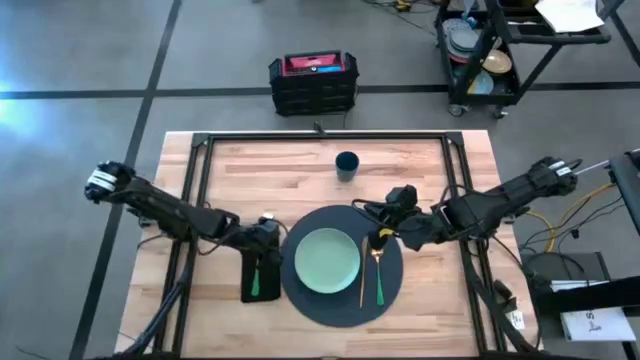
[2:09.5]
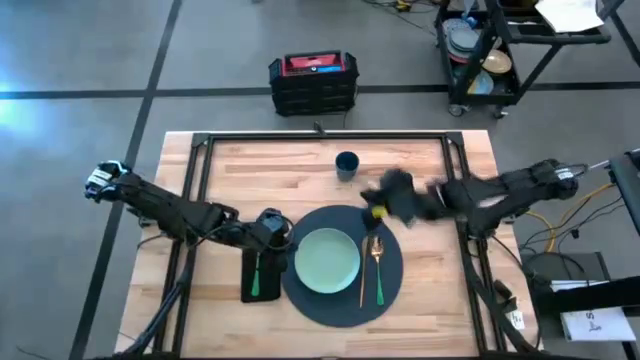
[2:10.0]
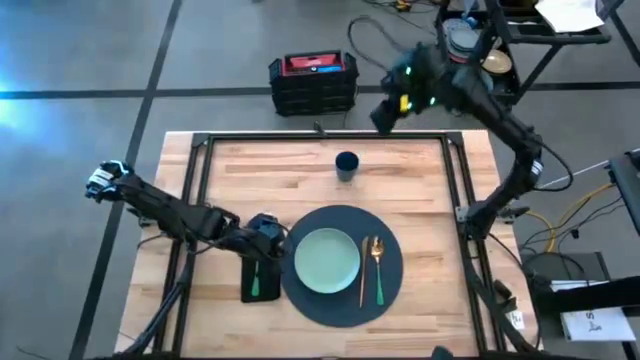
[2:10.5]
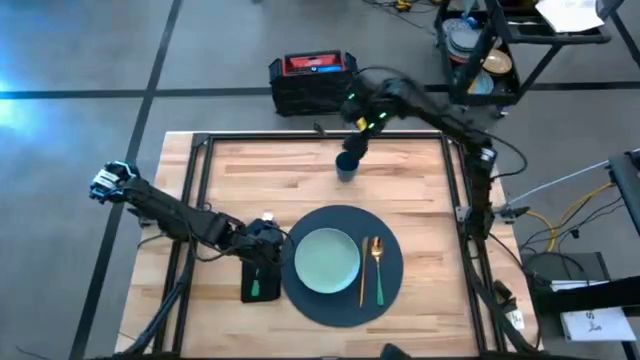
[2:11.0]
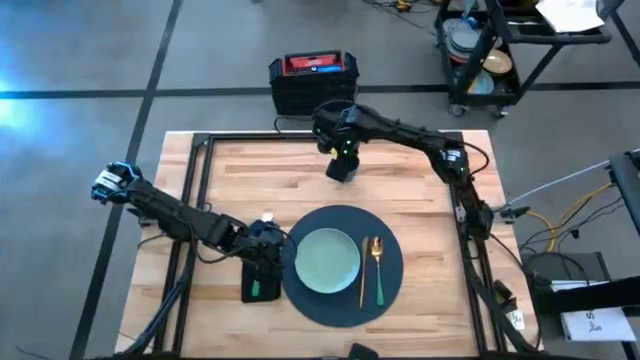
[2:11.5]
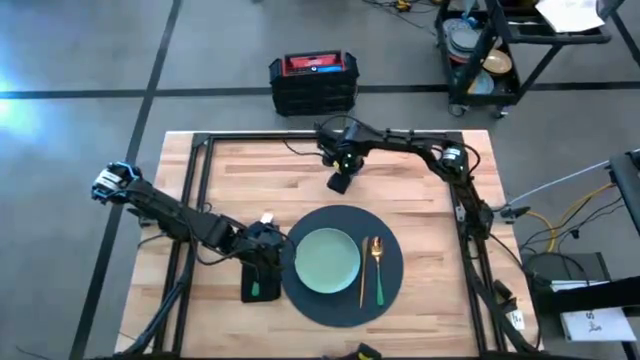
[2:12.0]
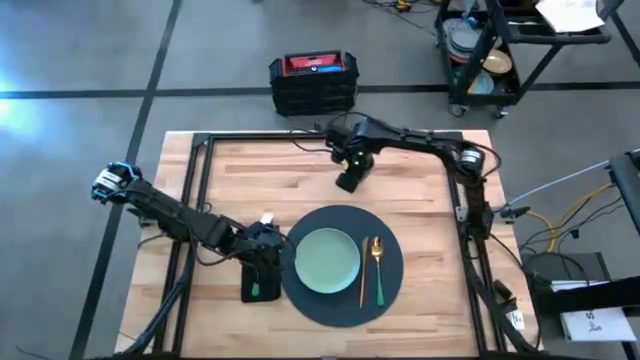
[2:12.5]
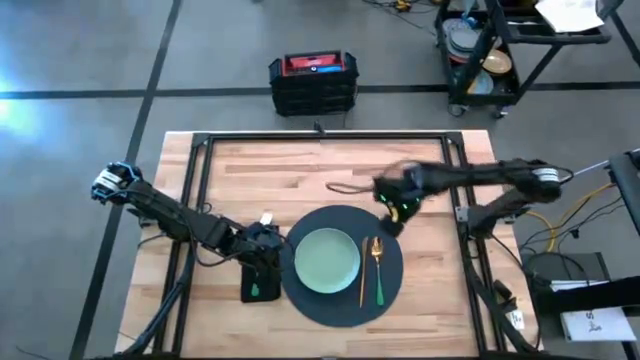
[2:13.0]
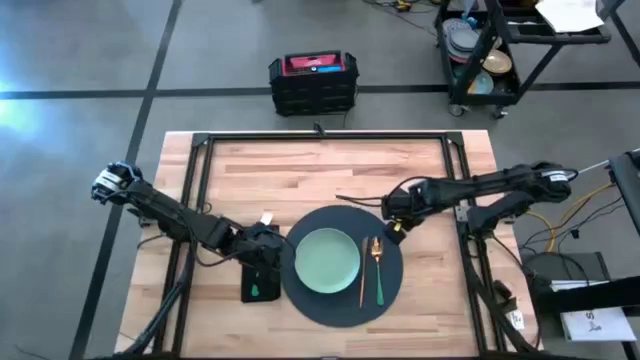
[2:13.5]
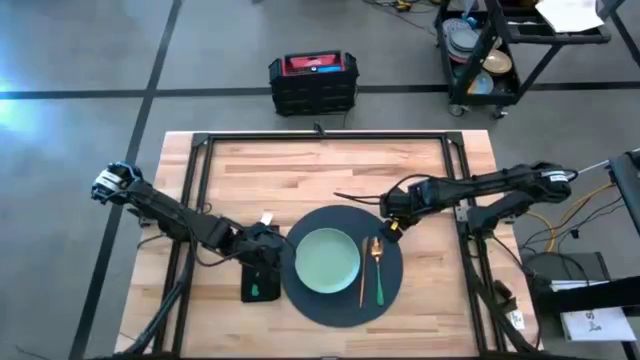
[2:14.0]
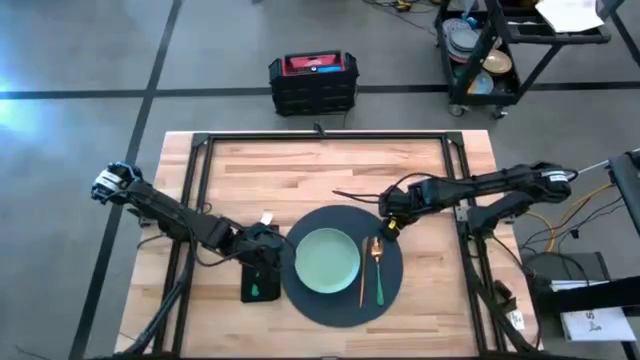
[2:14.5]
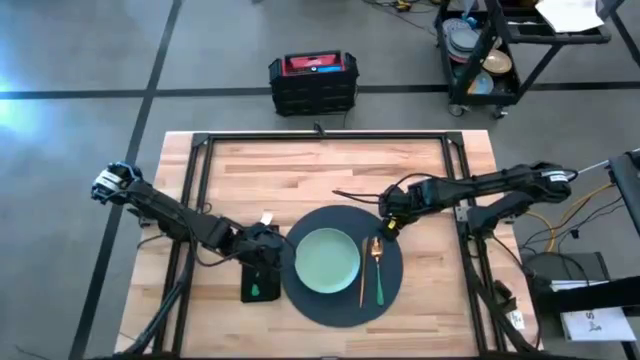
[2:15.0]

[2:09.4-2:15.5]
Task: Set table place
Move the blue cup to the middle right of the black placemat

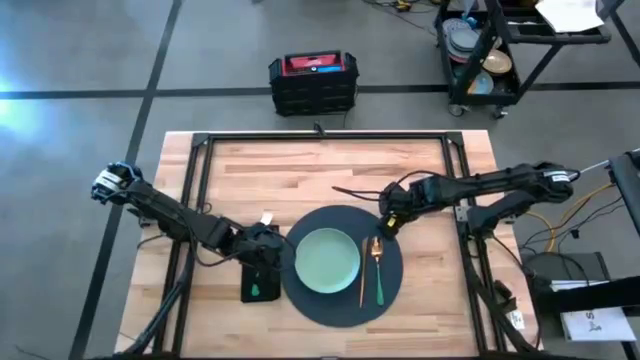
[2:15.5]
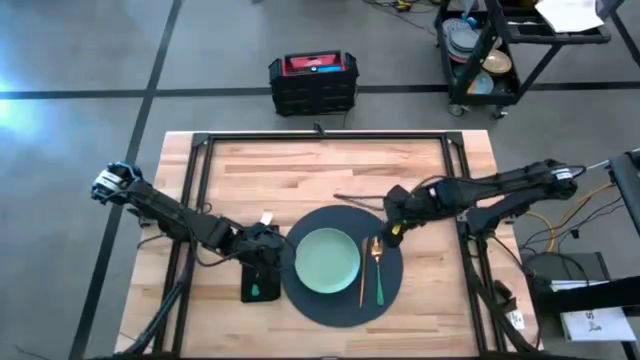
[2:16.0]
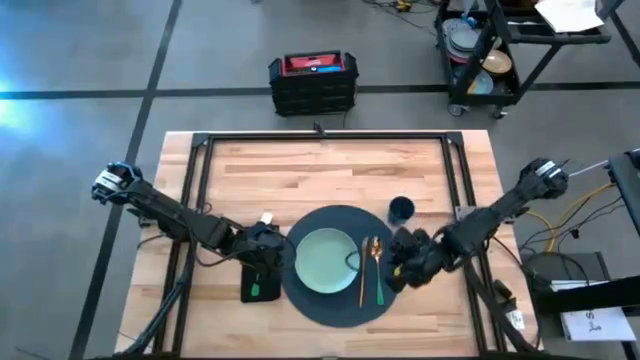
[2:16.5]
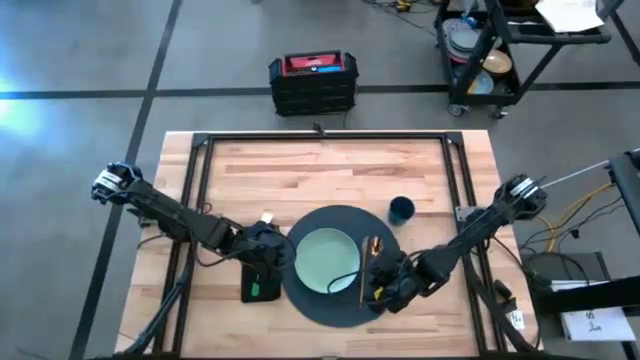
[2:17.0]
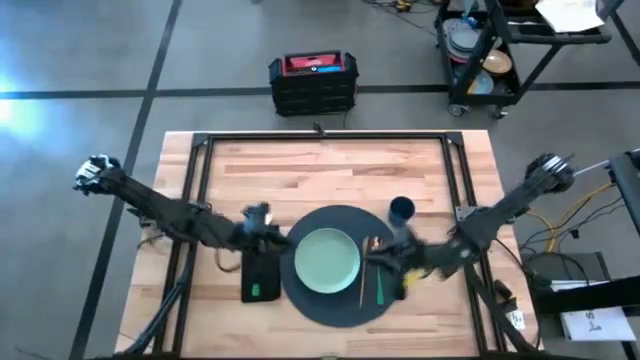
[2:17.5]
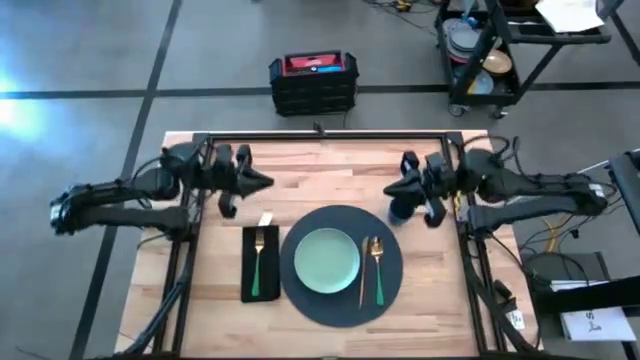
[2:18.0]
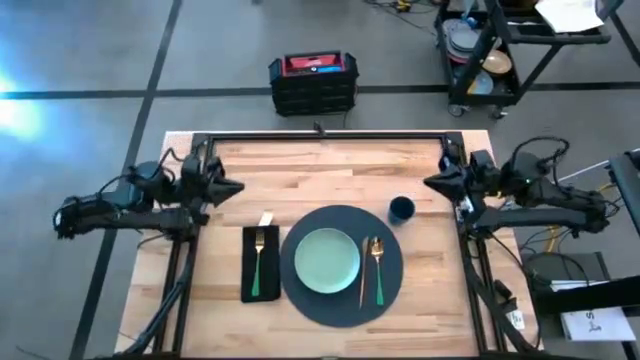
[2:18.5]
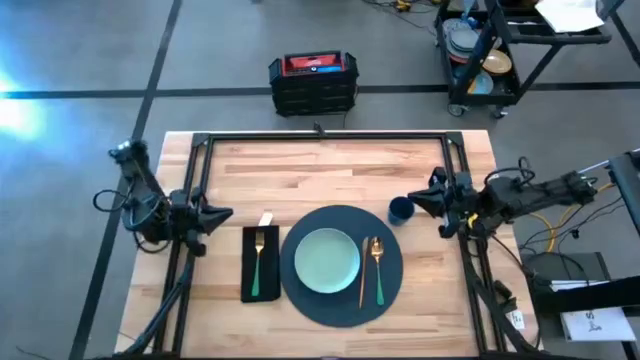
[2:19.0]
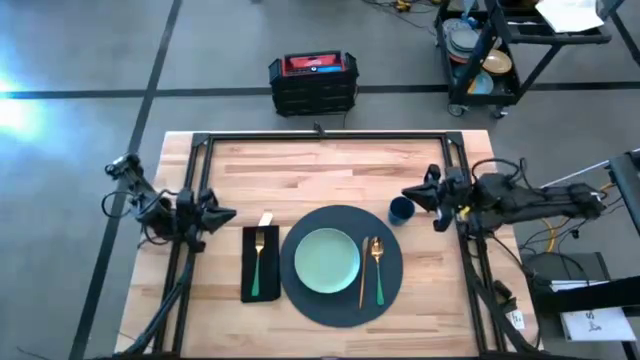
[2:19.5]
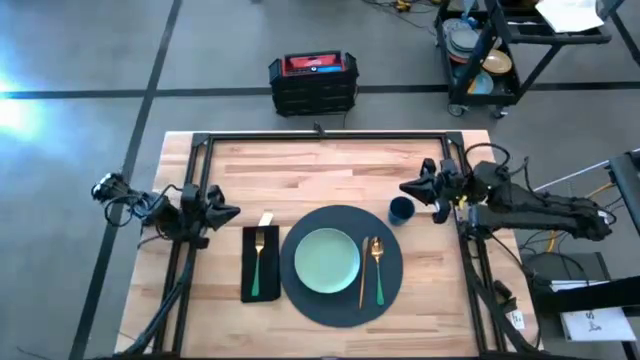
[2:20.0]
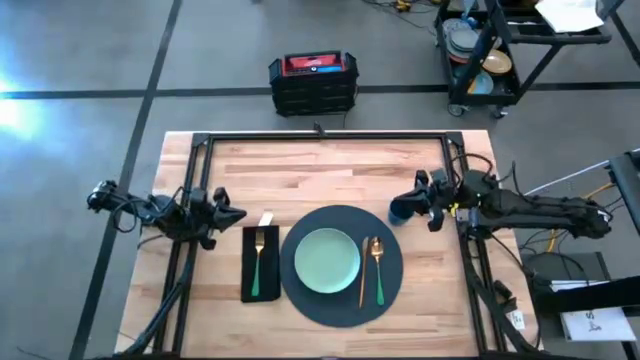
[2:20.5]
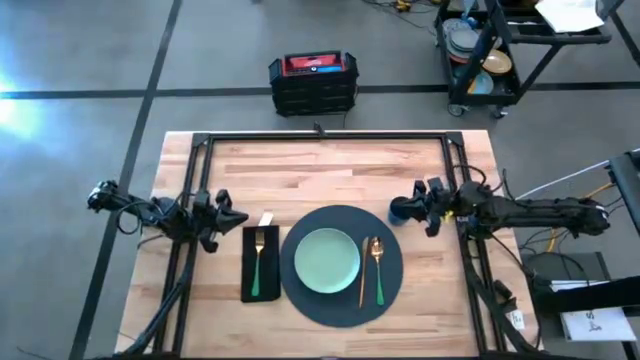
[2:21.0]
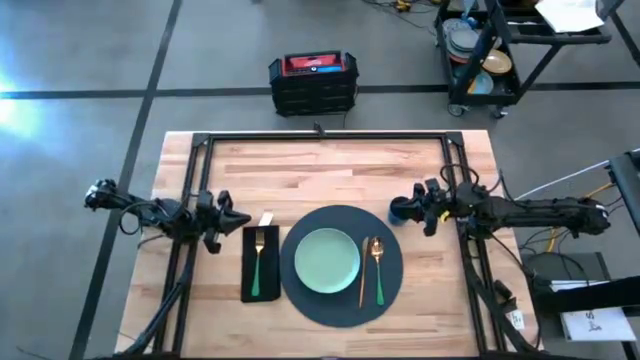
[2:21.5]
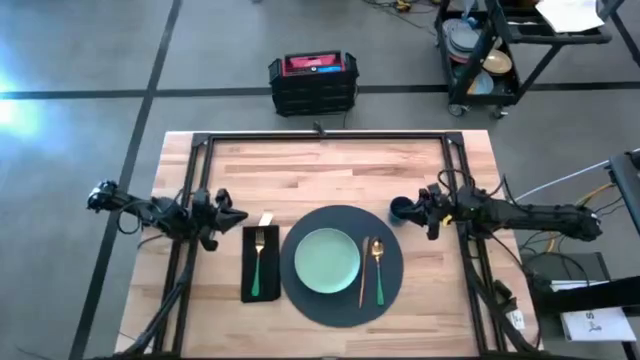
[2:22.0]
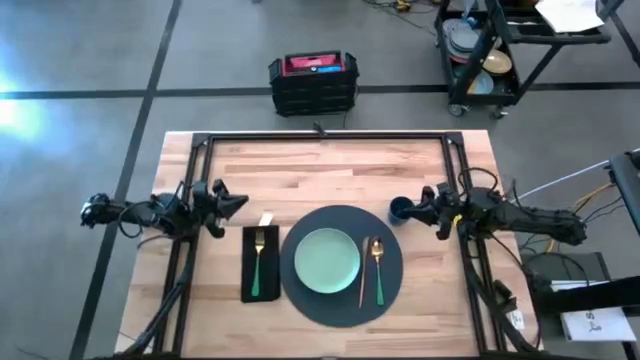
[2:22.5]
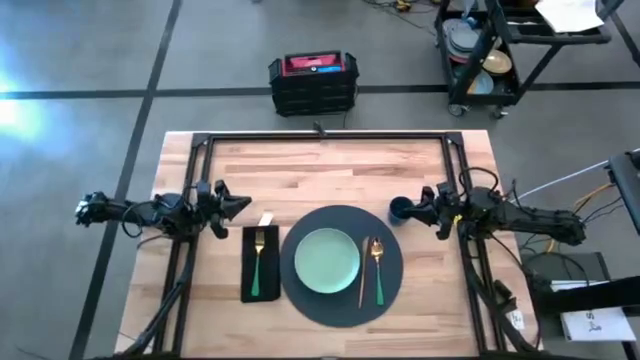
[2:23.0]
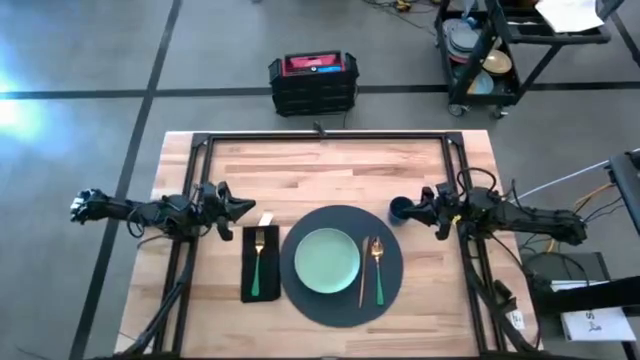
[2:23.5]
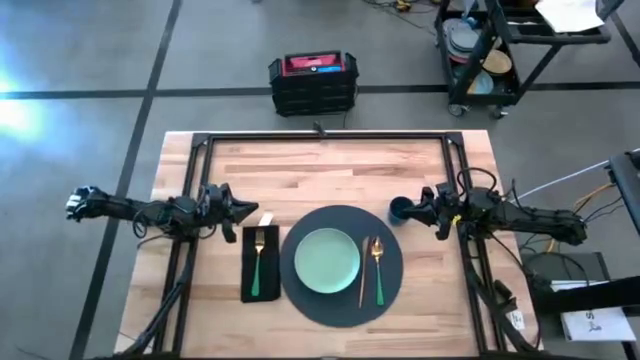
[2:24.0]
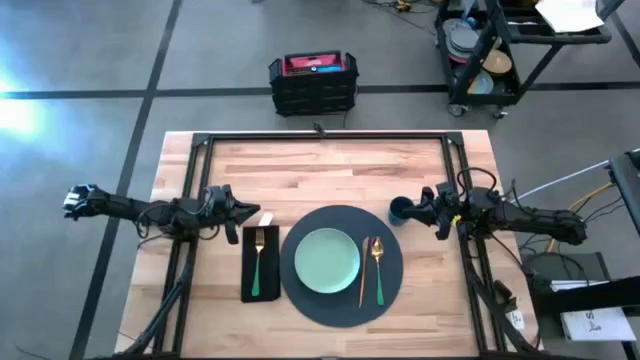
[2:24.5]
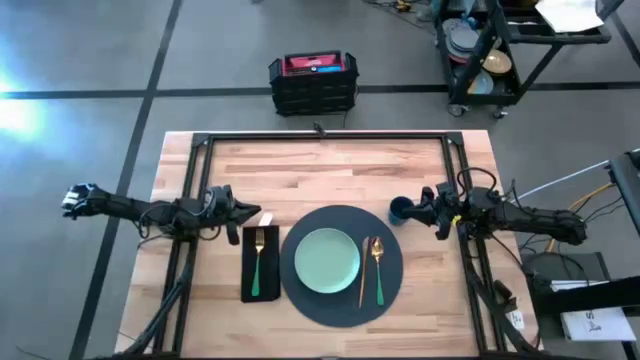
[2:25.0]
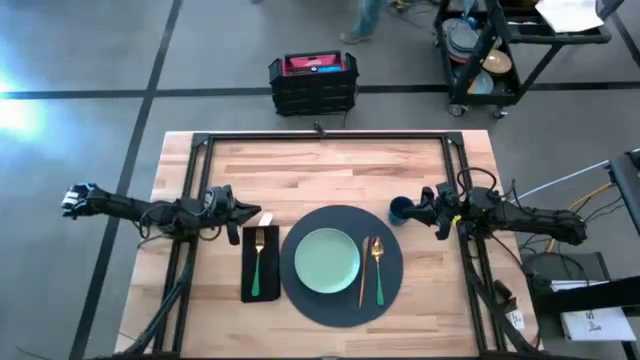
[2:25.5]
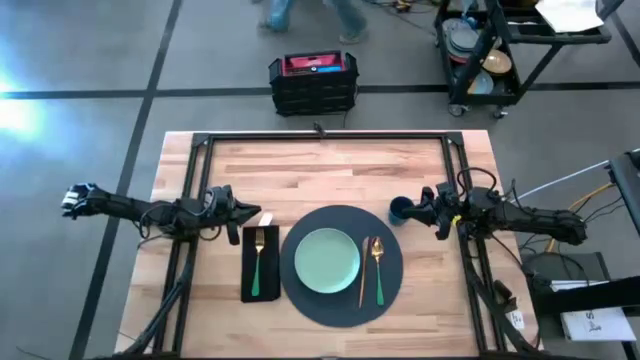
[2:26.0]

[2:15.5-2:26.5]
Return to Home Position
